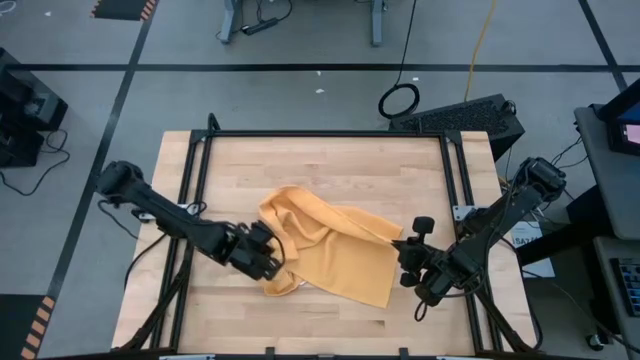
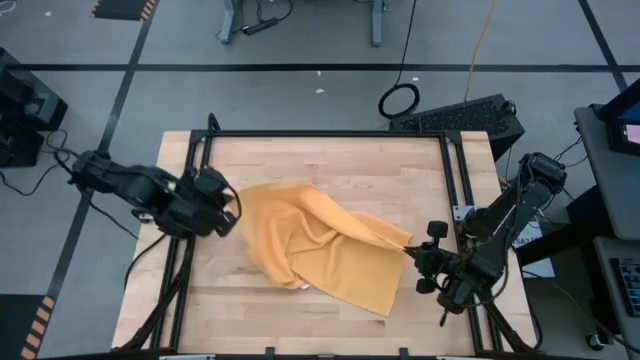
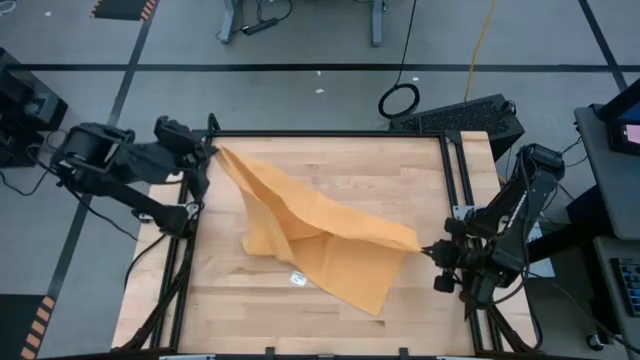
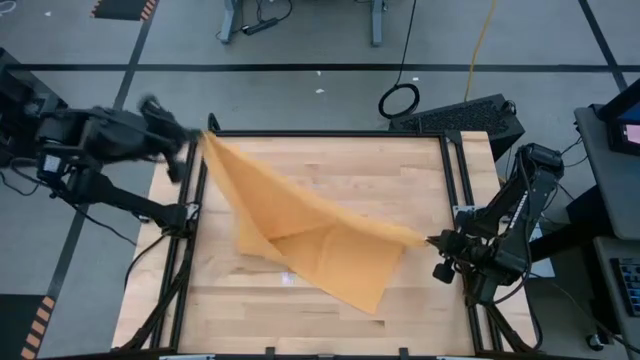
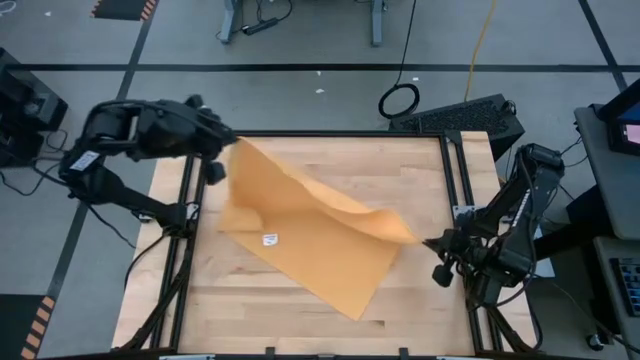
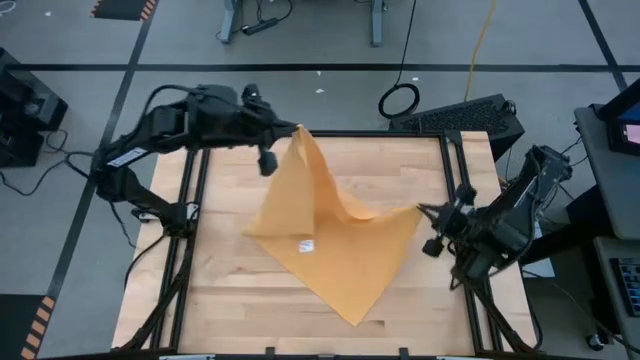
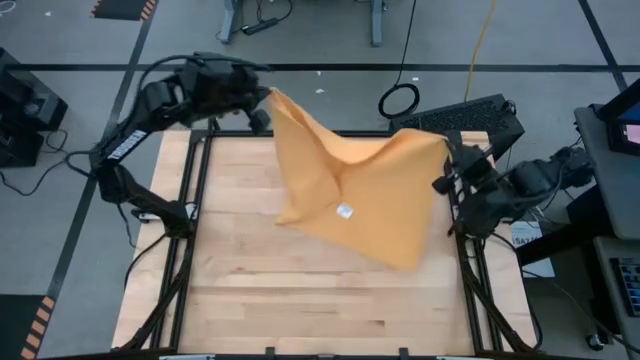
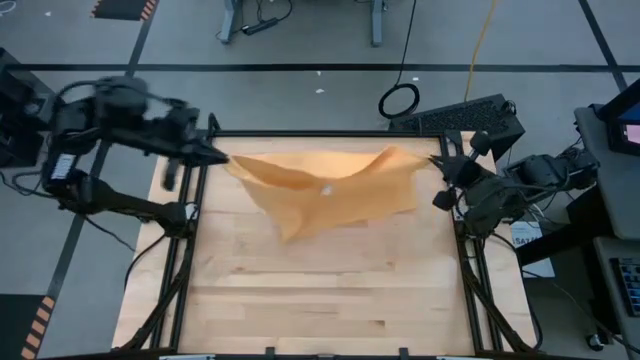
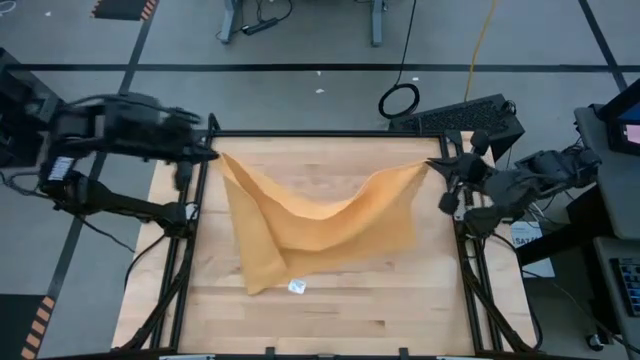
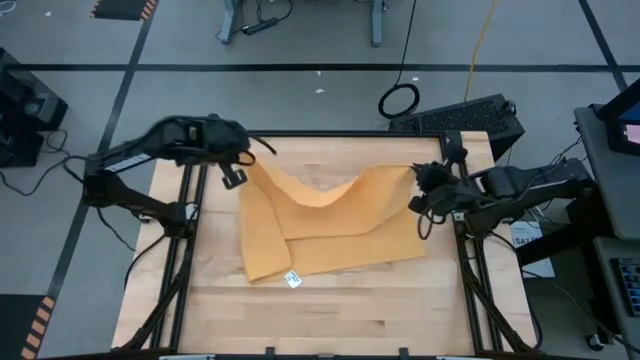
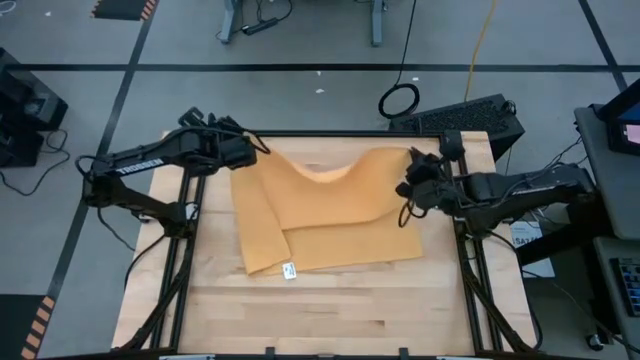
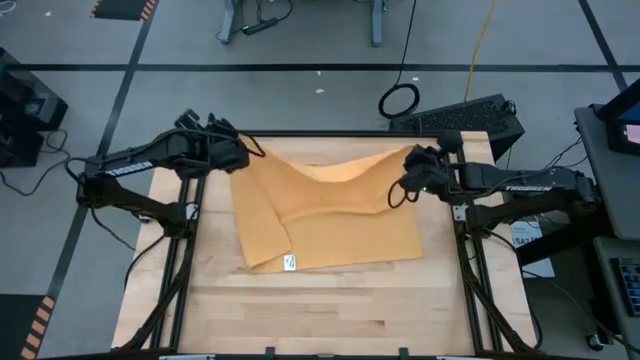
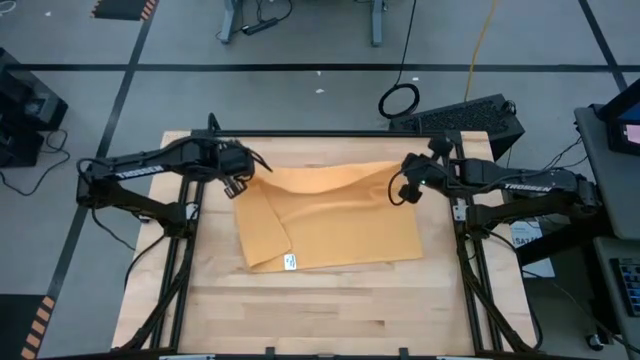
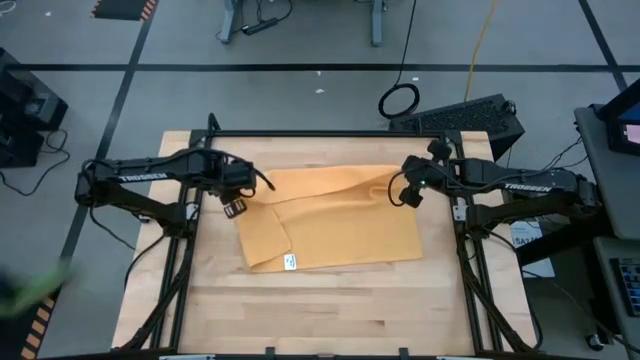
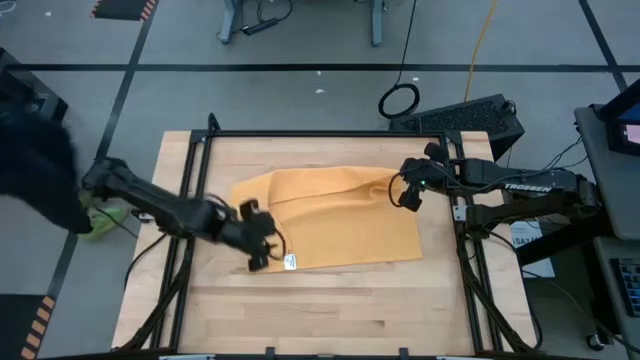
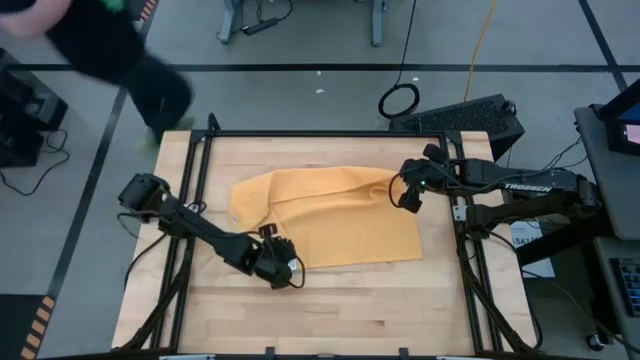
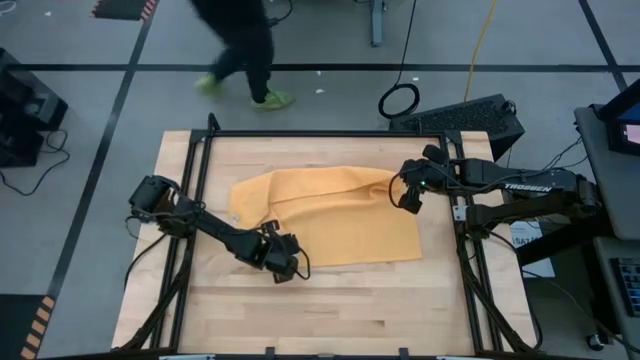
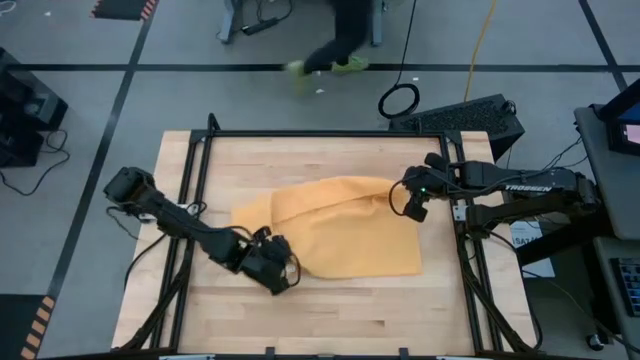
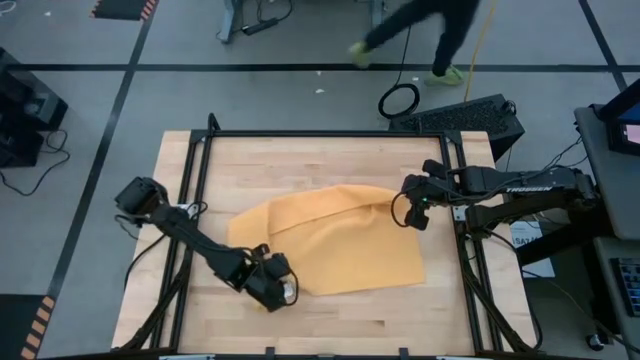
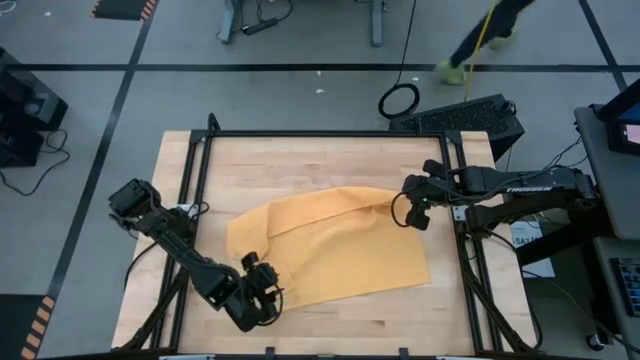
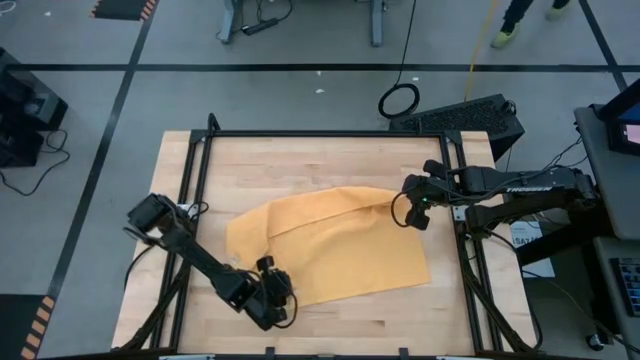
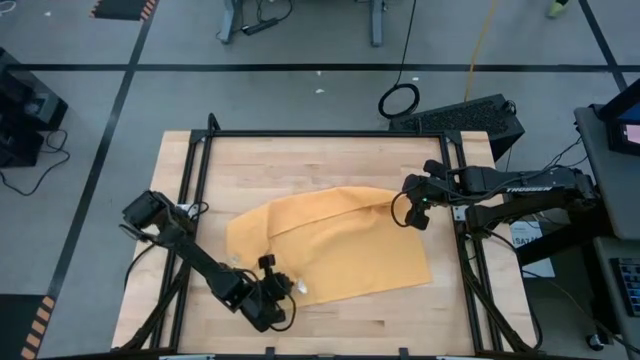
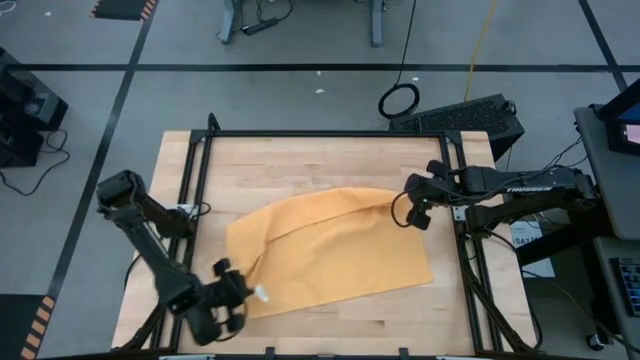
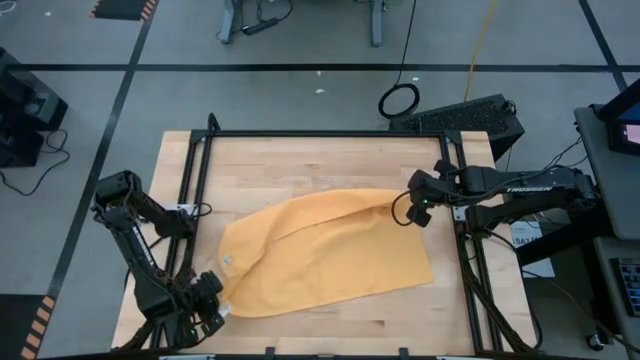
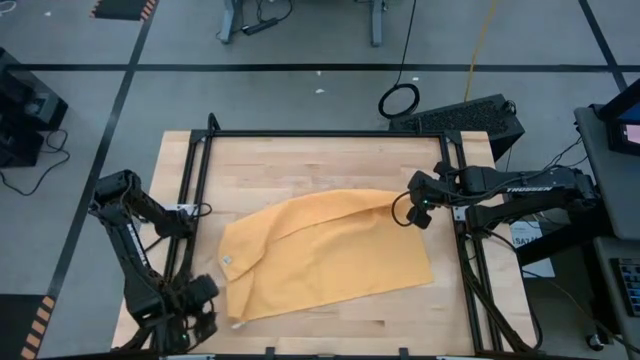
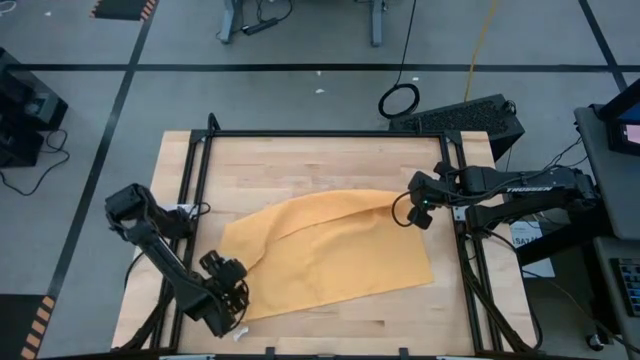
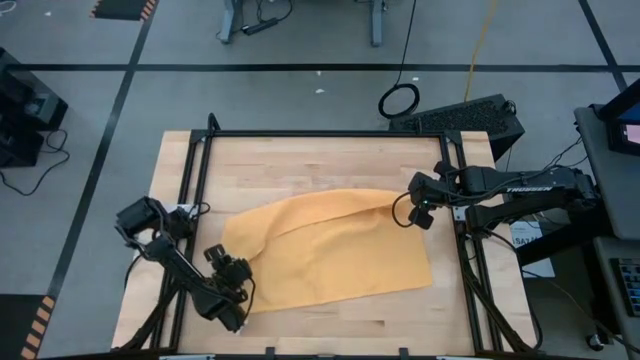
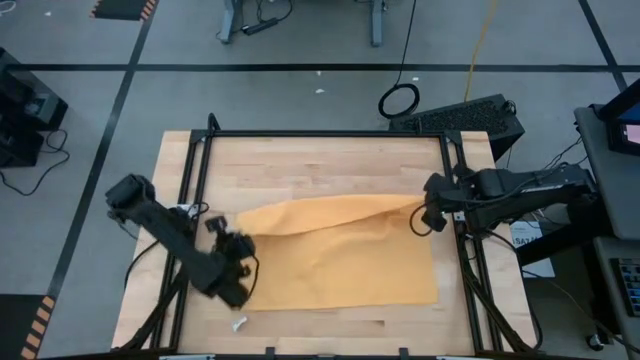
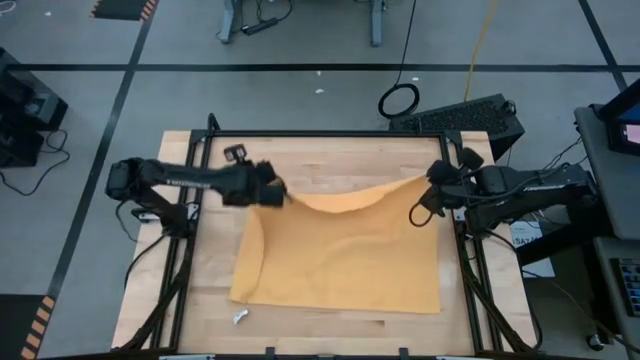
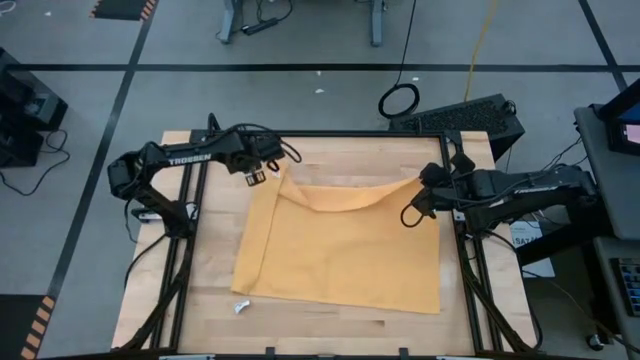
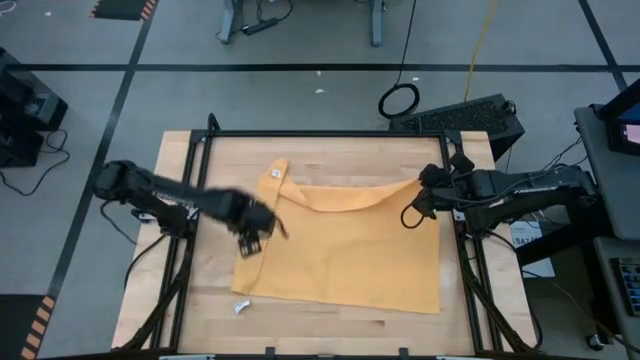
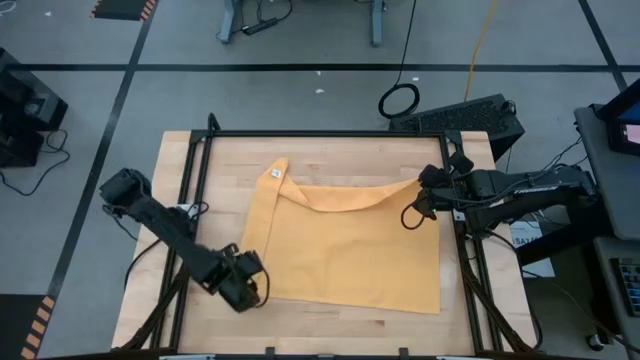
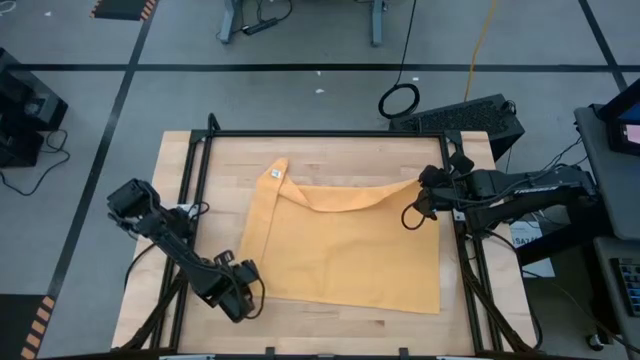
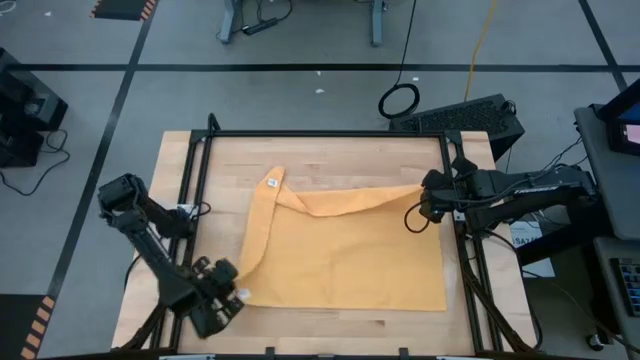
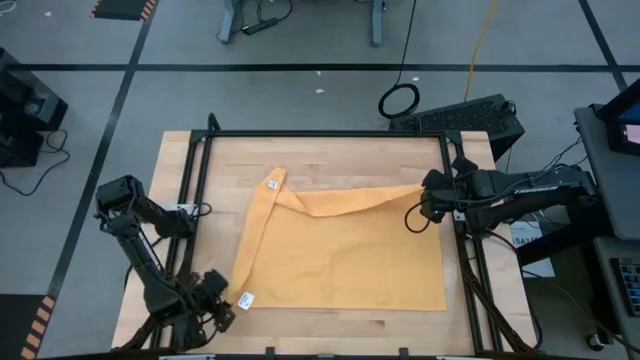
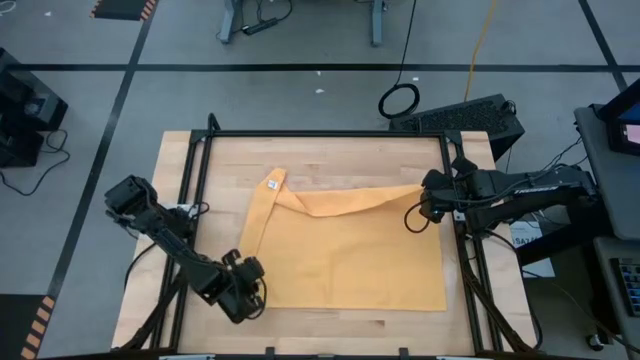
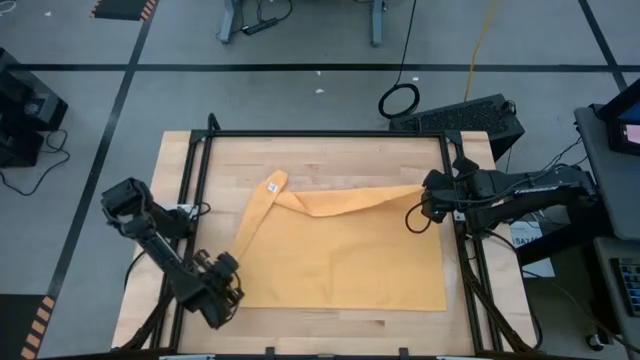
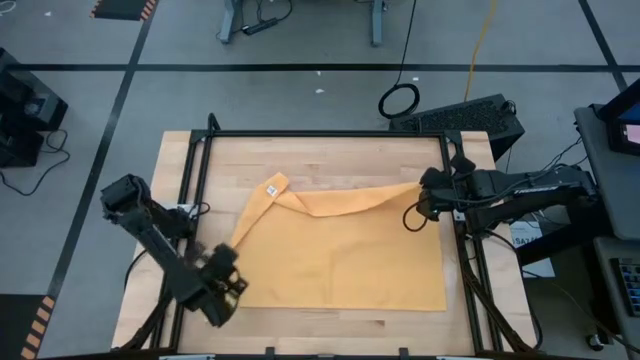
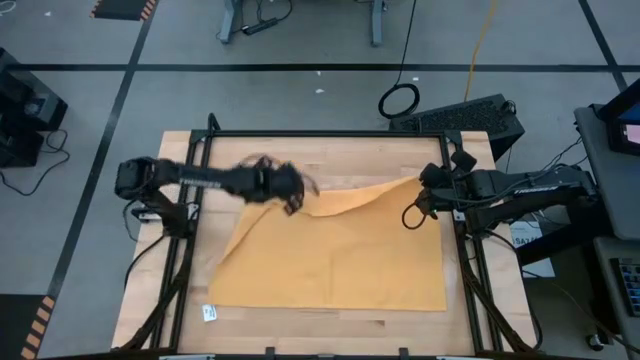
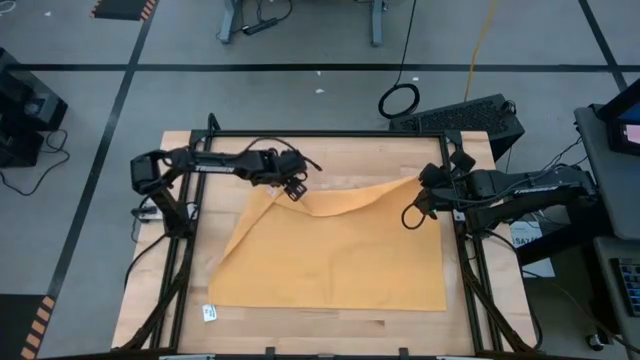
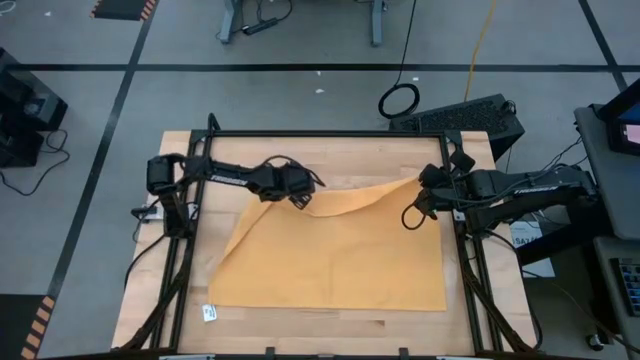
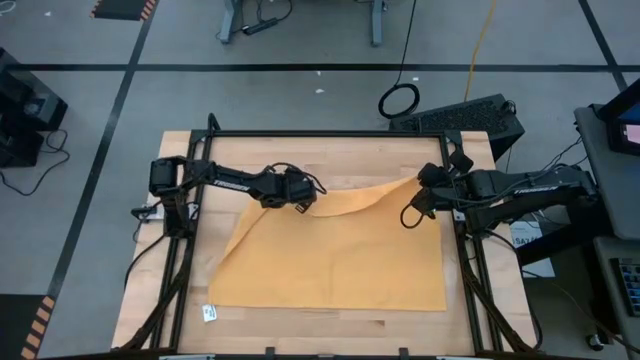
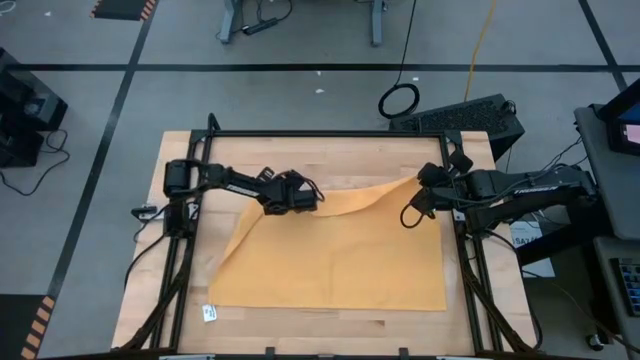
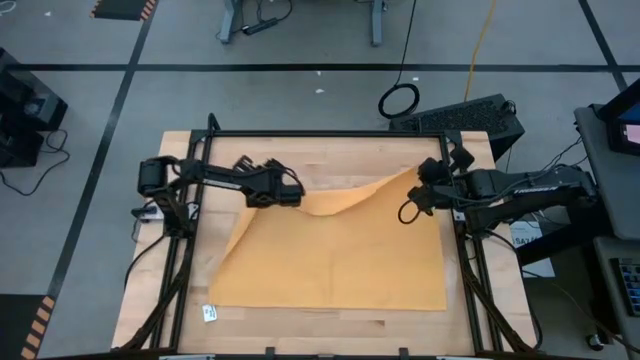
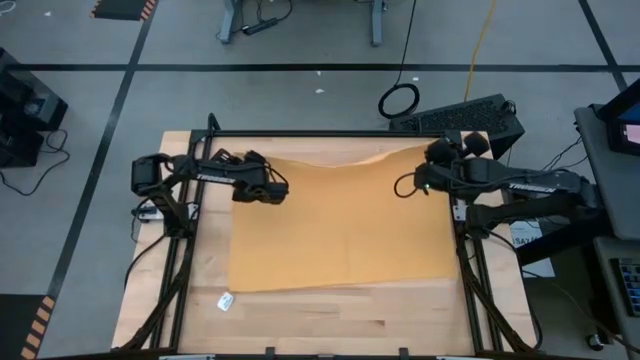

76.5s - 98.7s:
Task: Roll towel
Roll the yellow towel
